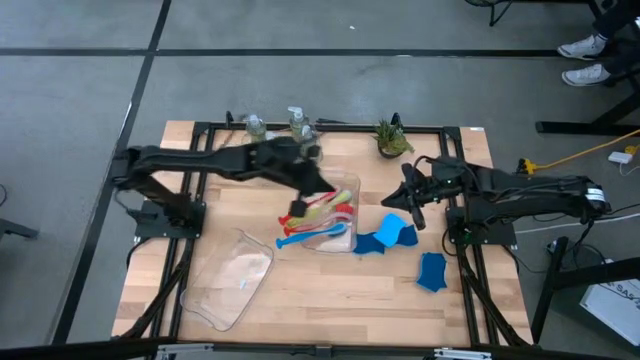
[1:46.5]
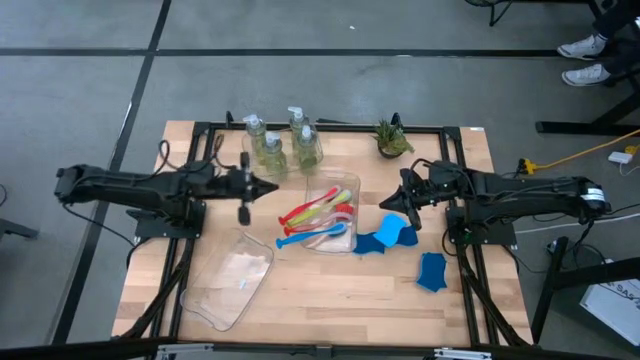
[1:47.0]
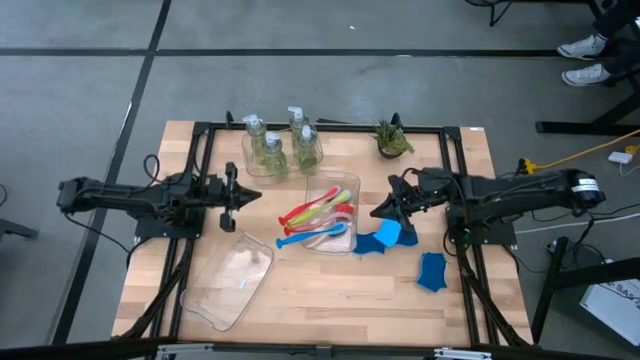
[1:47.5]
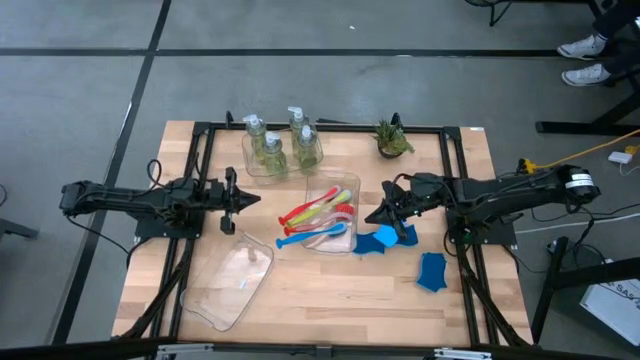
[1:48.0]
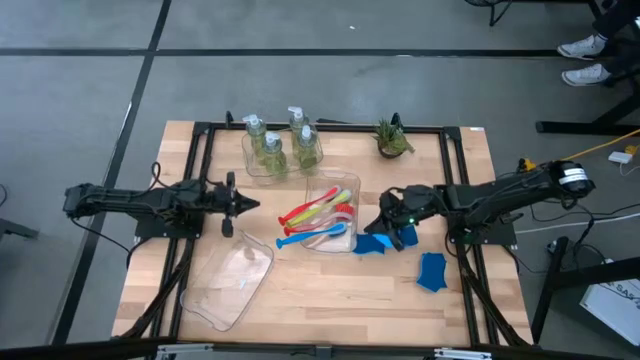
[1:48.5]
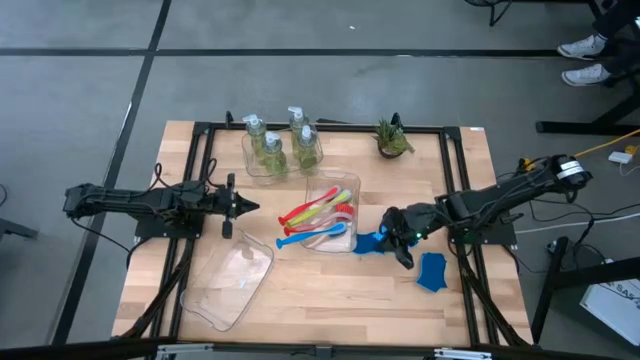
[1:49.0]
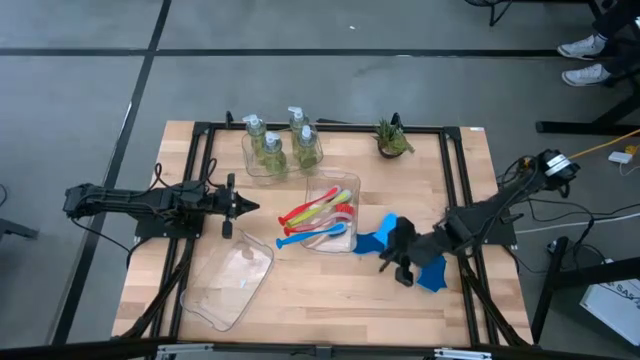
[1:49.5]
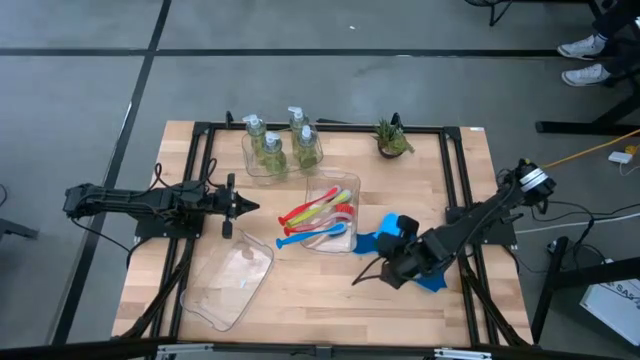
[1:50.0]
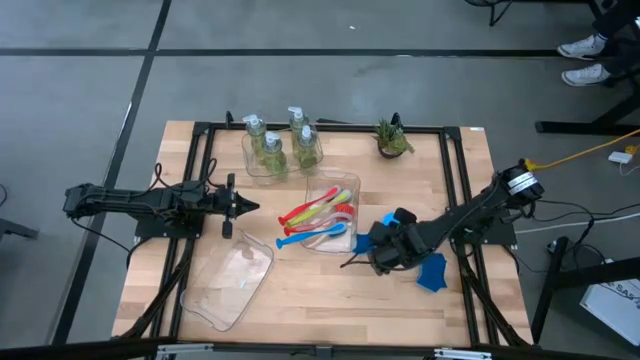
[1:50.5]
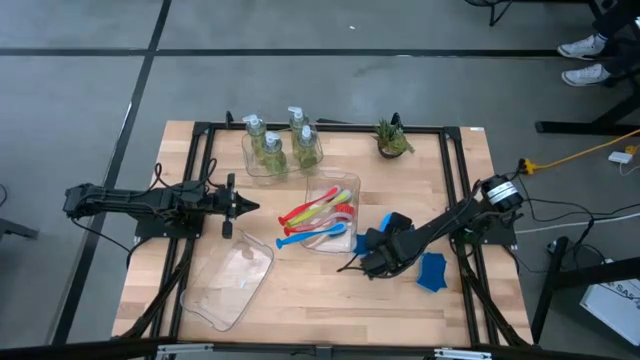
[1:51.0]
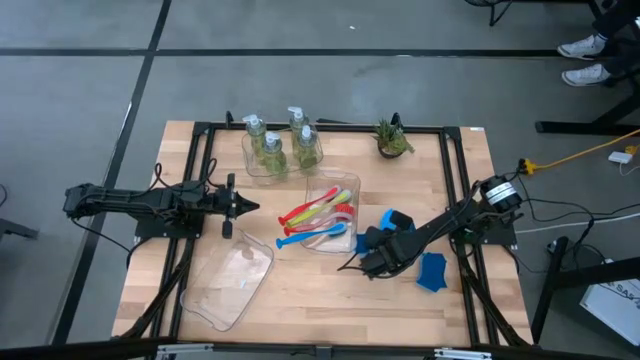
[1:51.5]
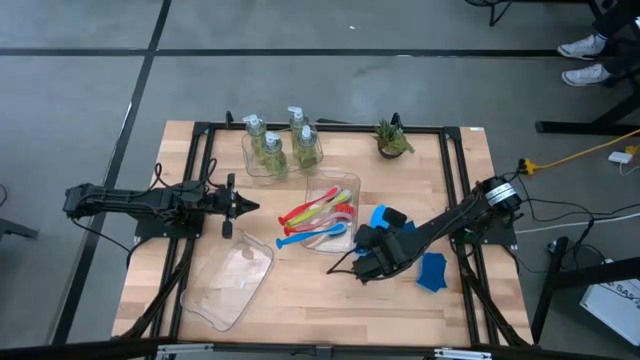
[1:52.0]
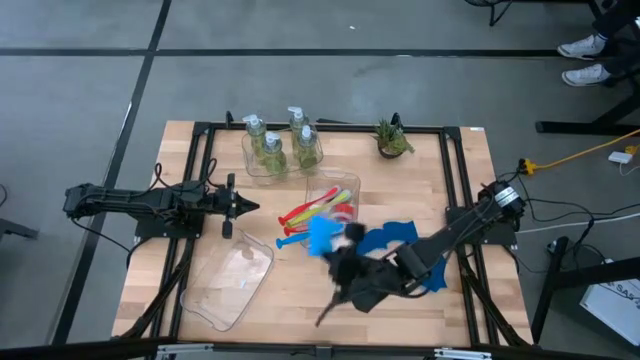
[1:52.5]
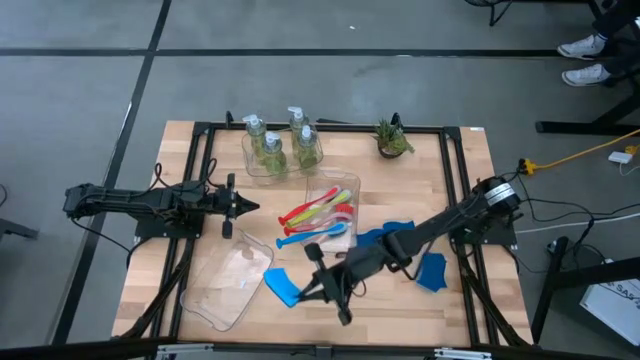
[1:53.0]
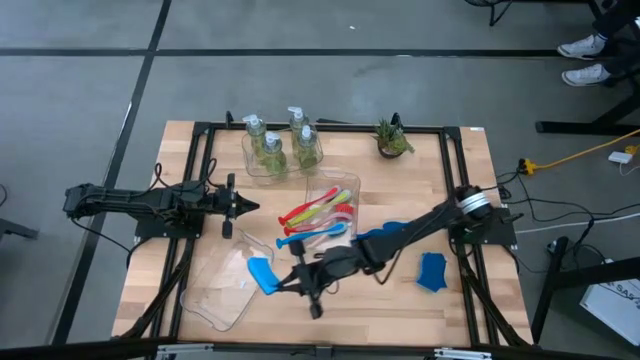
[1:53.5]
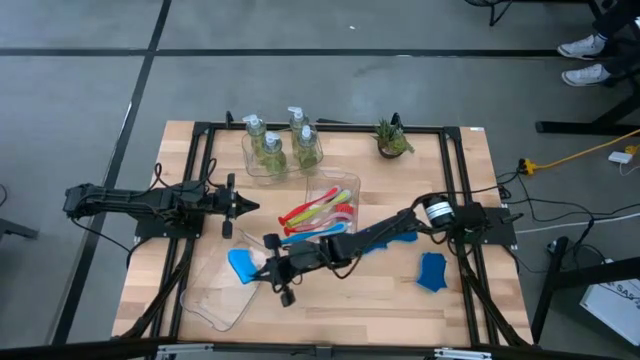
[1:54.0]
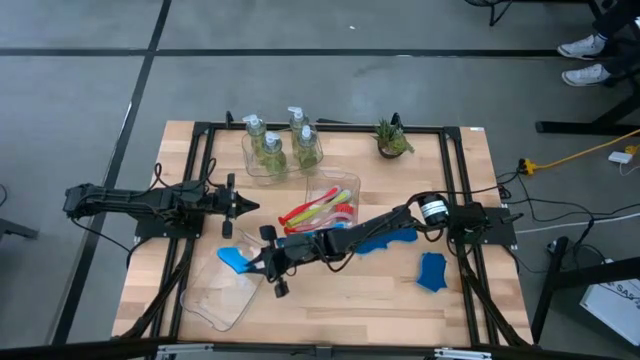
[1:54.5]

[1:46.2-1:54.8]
Task: Pick & Place Kitchen Sink Supplies
Put the blue sponge into the bottom transparent bin

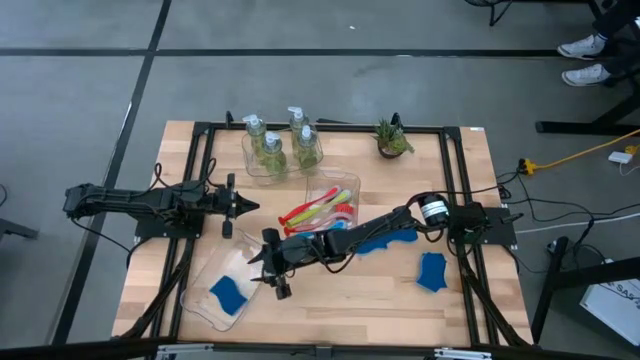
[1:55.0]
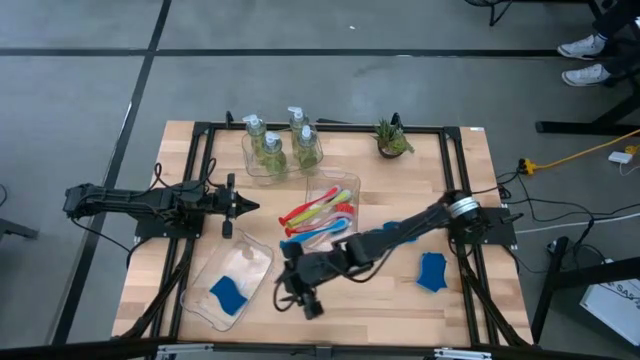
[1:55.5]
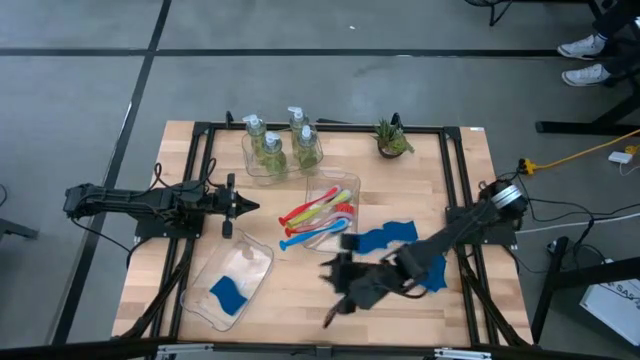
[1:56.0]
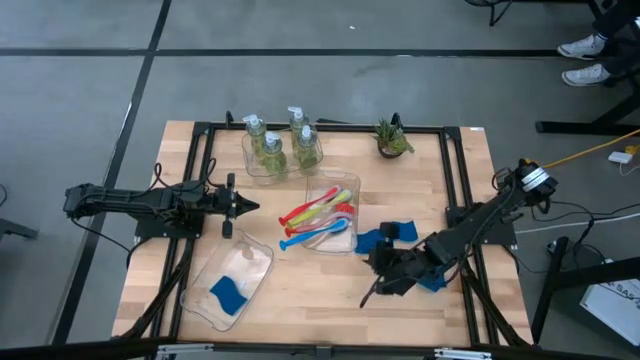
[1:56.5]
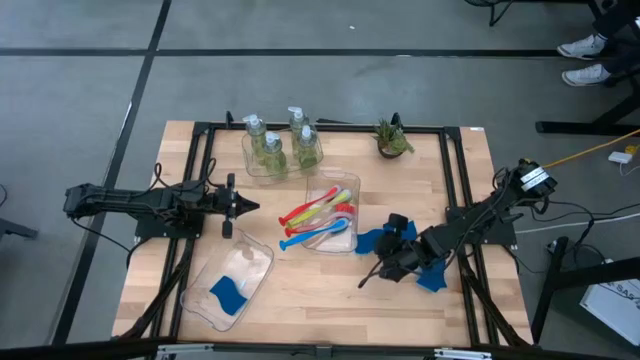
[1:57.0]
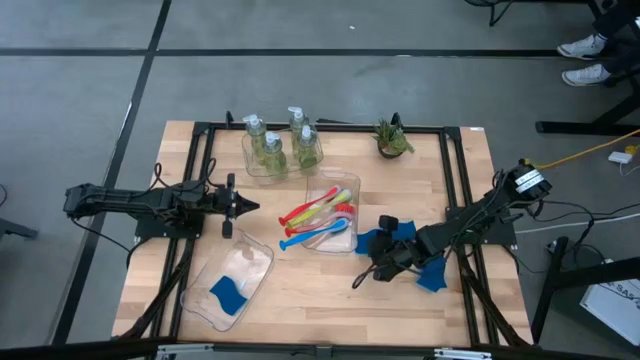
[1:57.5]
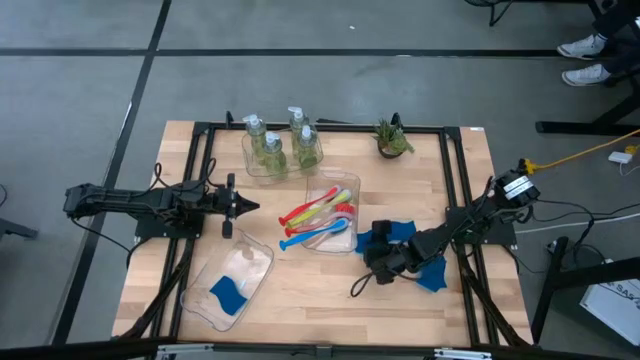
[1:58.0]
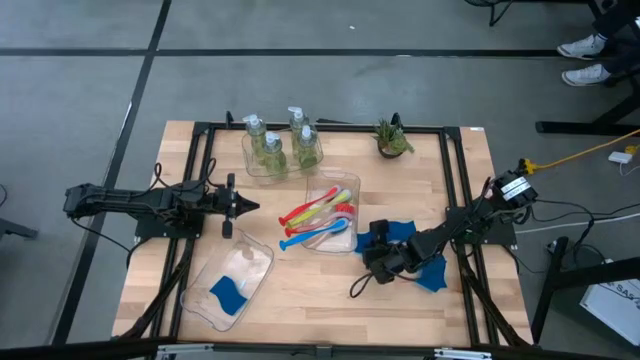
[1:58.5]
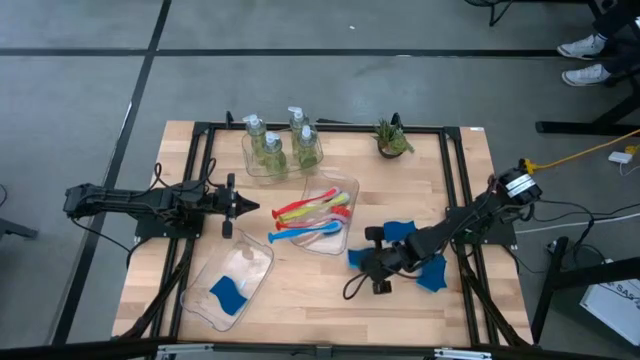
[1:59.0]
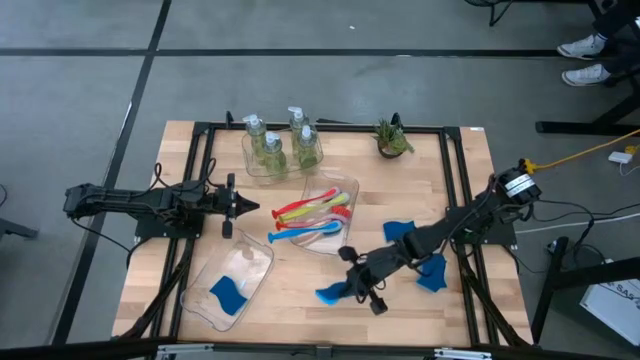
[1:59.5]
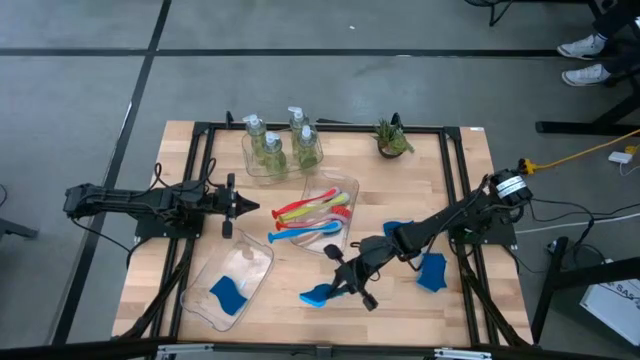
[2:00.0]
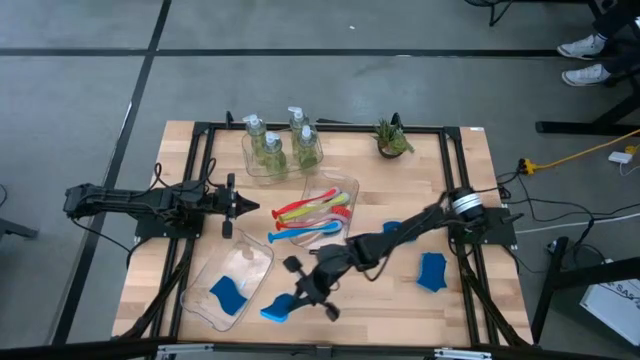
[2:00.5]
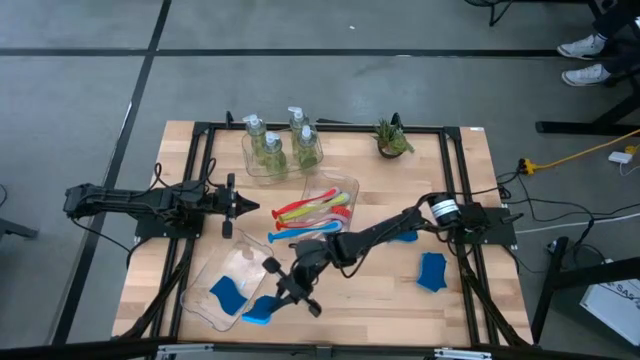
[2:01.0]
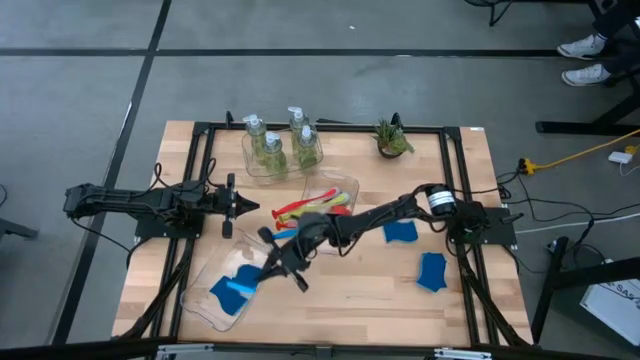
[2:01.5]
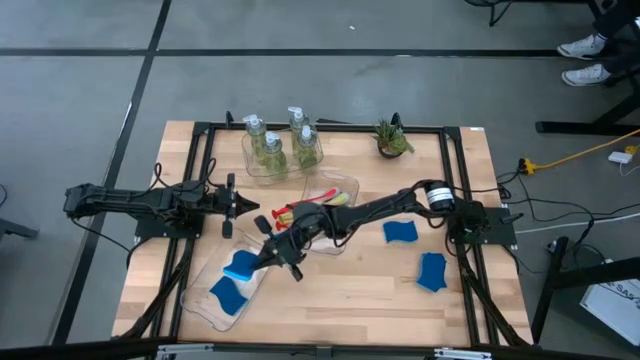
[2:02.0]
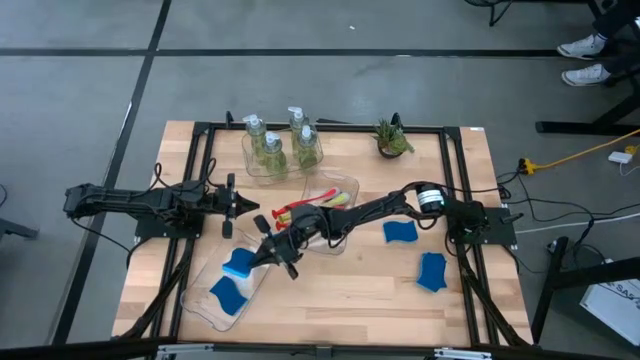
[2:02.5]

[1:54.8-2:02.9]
Put the blue sponge into the bottom transparent bin

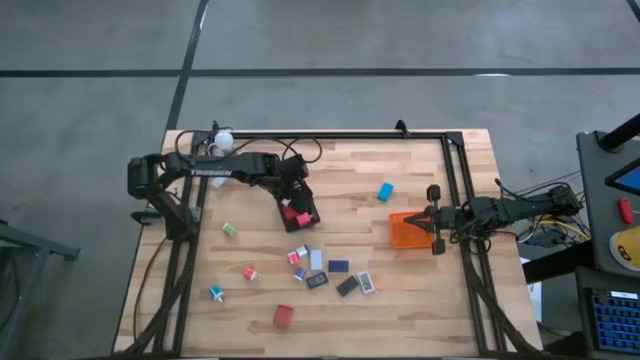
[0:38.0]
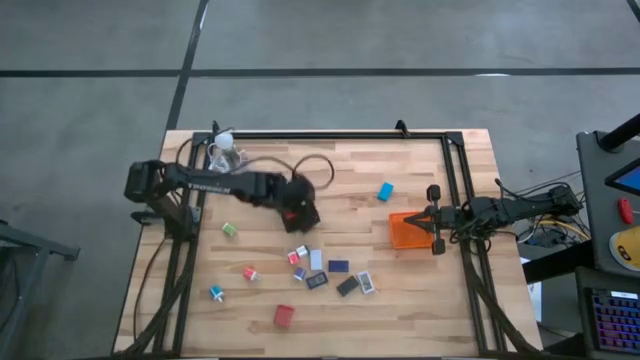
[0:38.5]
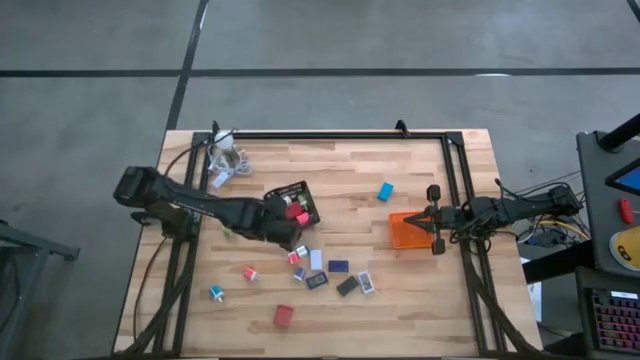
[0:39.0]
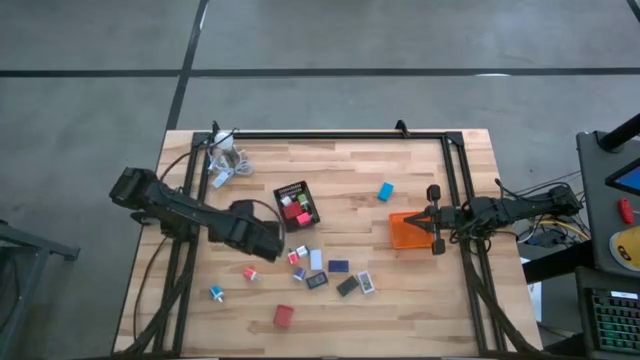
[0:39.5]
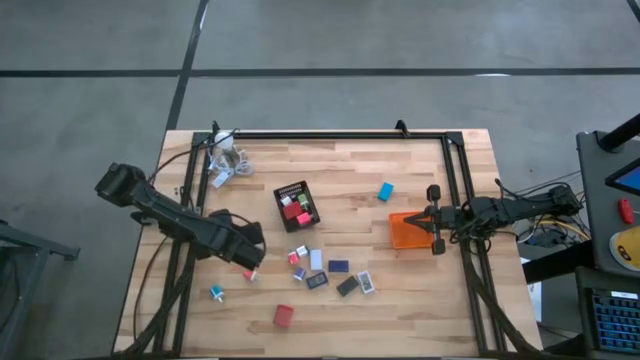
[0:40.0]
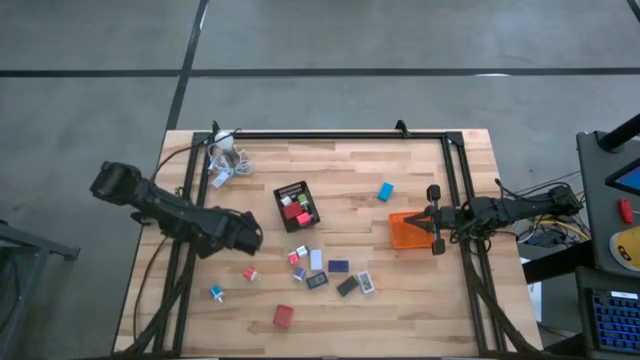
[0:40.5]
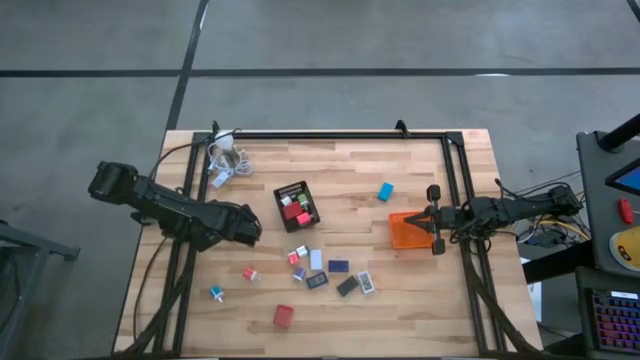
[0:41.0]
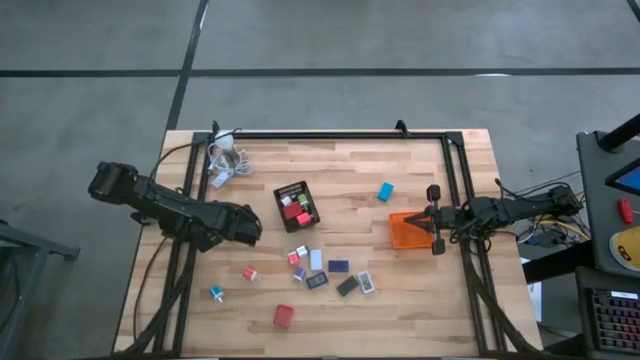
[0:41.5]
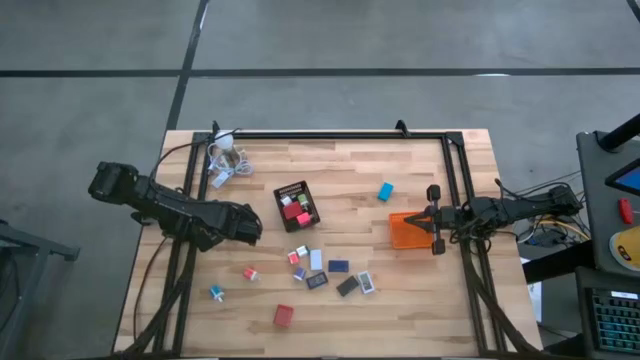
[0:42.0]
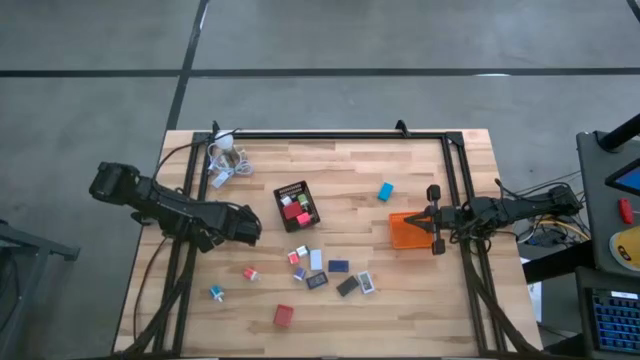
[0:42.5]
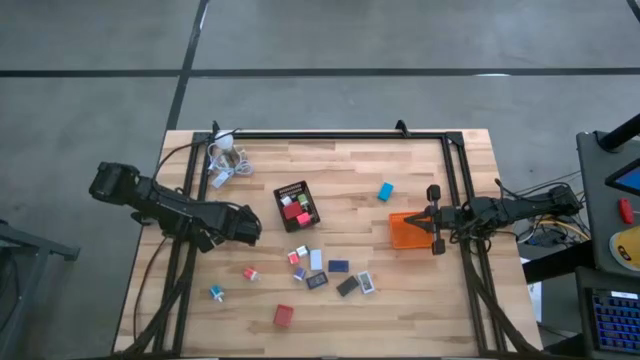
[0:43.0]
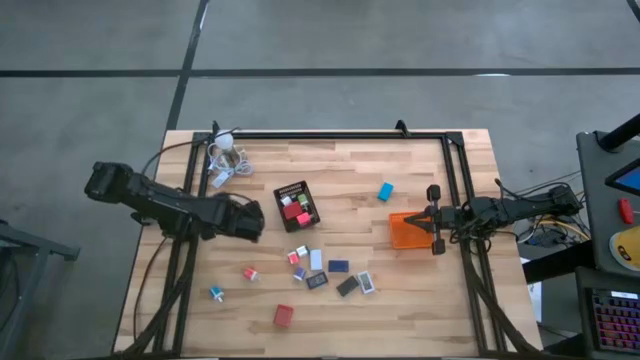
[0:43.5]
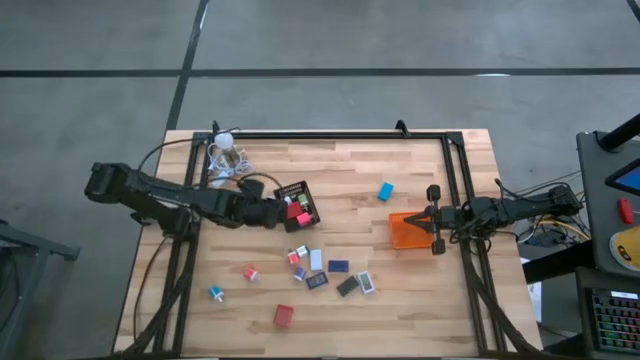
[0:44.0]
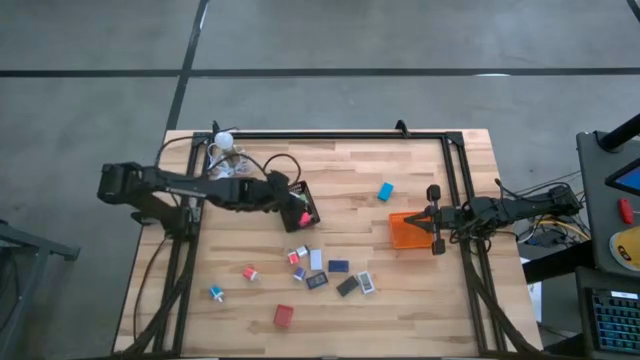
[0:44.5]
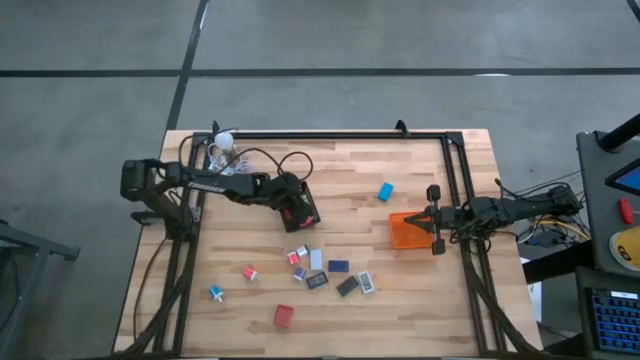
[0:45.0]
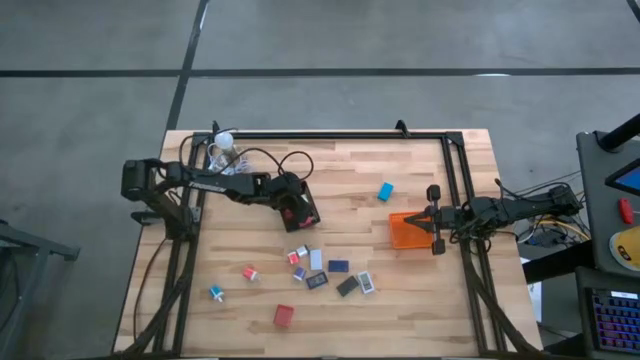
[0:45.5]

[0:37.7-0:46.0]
Task: Pick & Place Office items
Put the green charger adapter in the black bin
